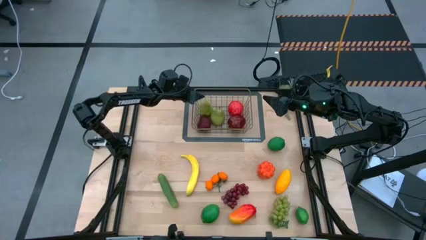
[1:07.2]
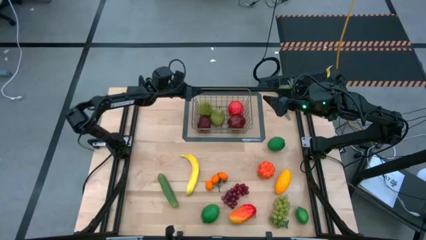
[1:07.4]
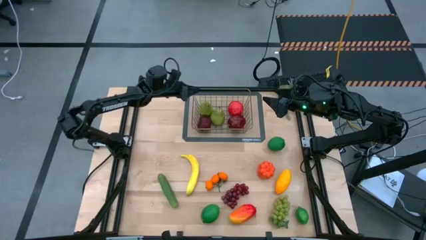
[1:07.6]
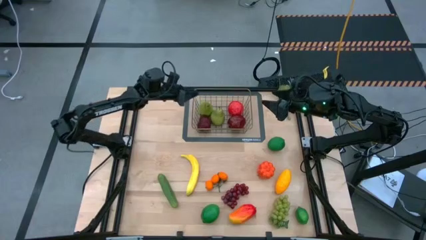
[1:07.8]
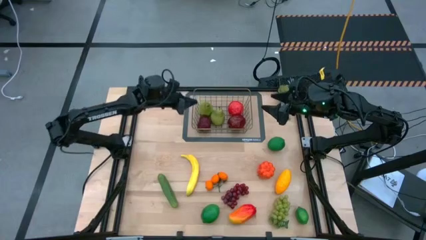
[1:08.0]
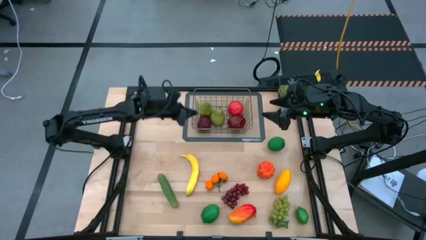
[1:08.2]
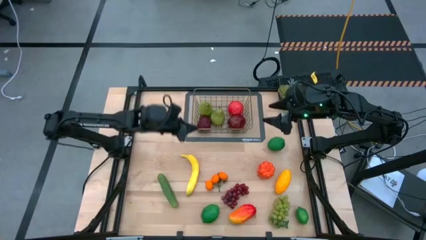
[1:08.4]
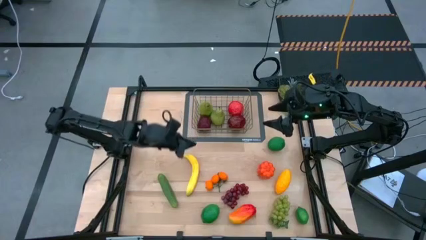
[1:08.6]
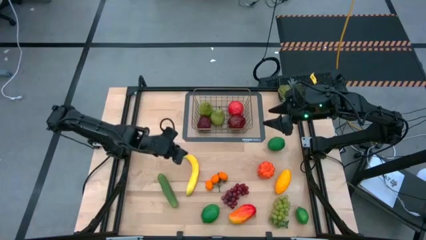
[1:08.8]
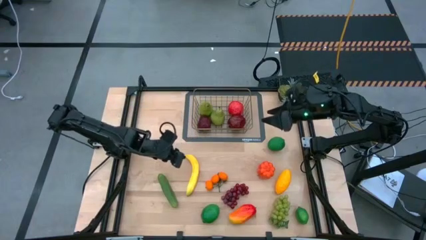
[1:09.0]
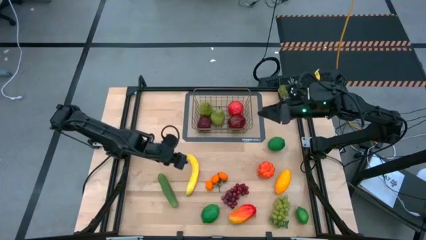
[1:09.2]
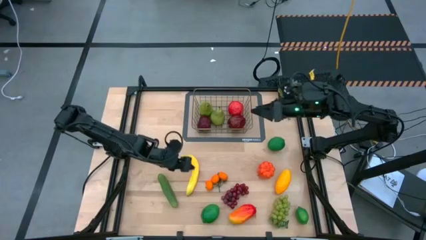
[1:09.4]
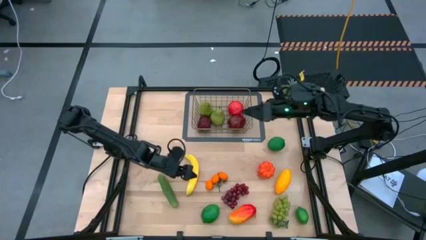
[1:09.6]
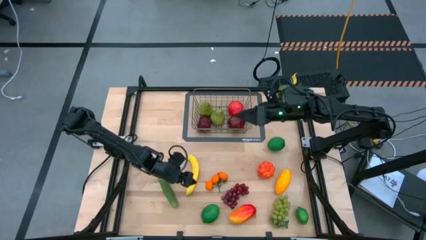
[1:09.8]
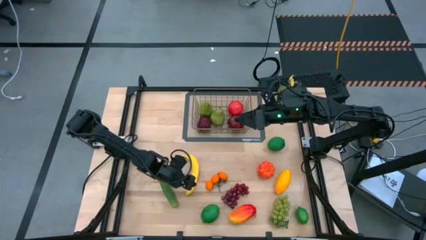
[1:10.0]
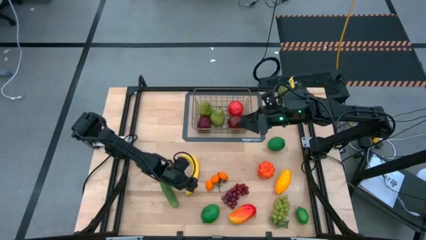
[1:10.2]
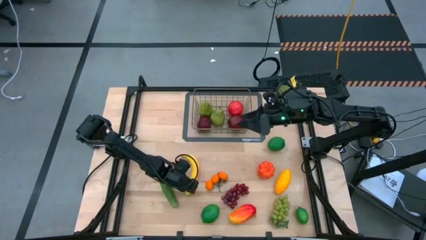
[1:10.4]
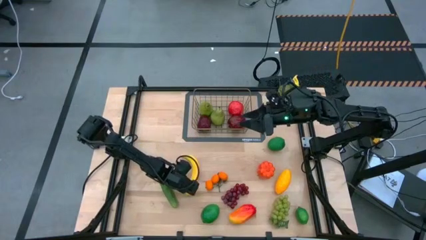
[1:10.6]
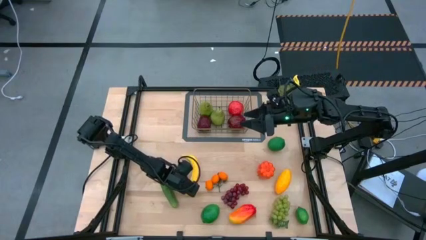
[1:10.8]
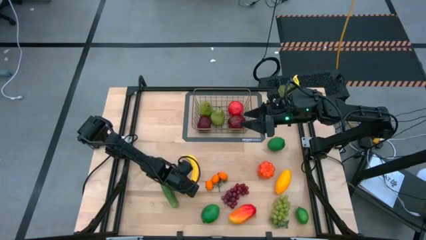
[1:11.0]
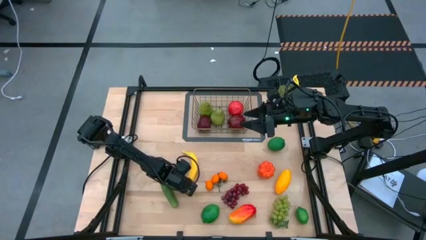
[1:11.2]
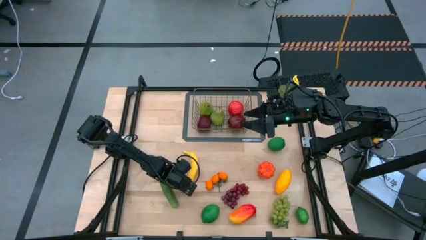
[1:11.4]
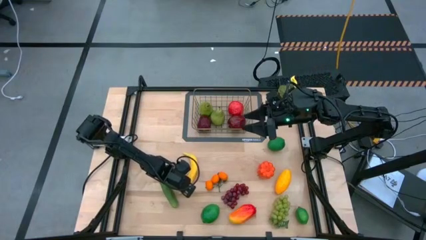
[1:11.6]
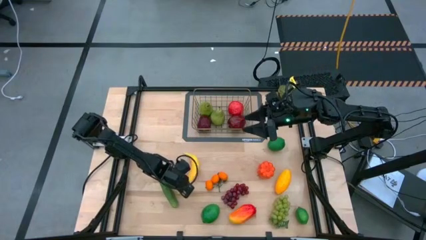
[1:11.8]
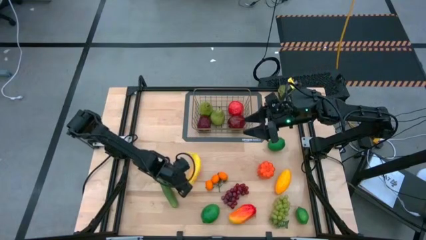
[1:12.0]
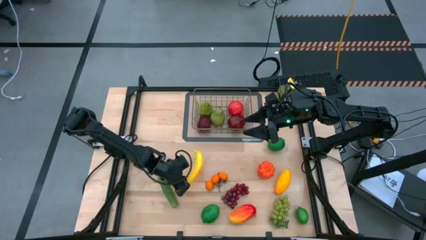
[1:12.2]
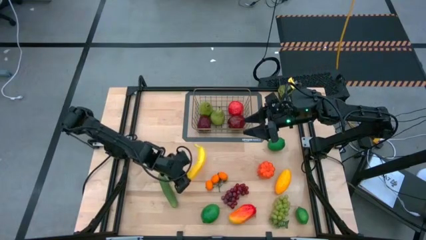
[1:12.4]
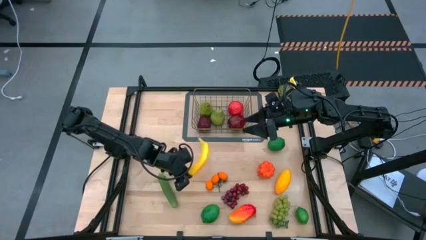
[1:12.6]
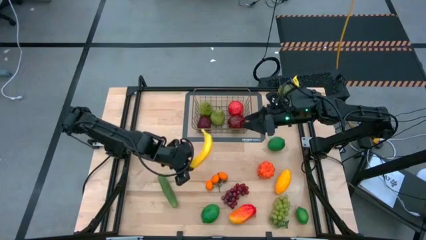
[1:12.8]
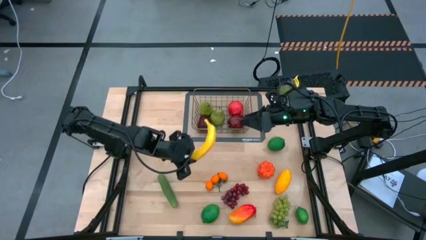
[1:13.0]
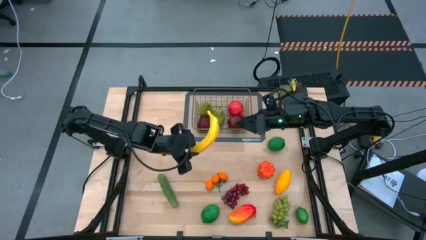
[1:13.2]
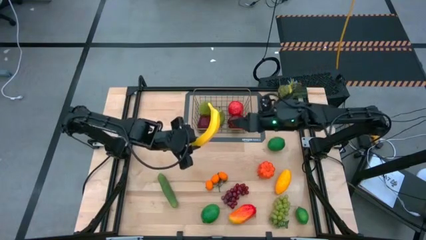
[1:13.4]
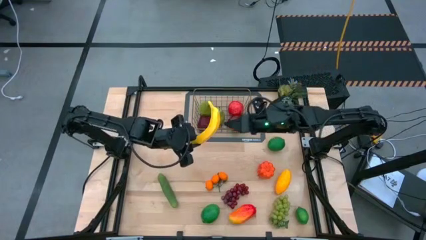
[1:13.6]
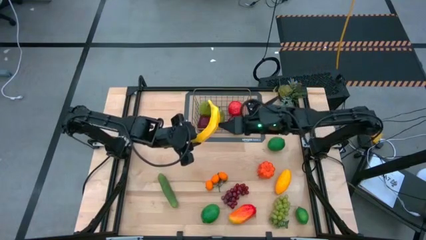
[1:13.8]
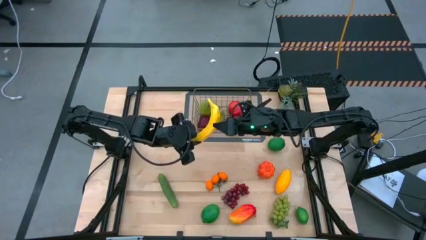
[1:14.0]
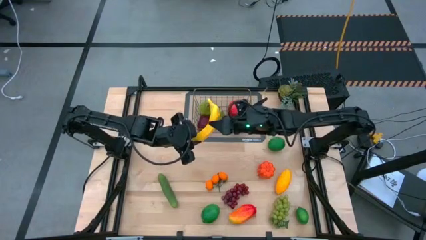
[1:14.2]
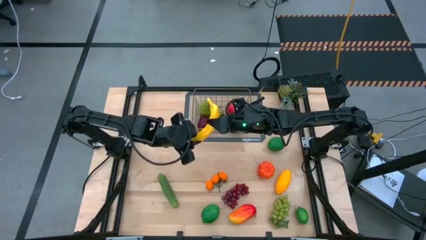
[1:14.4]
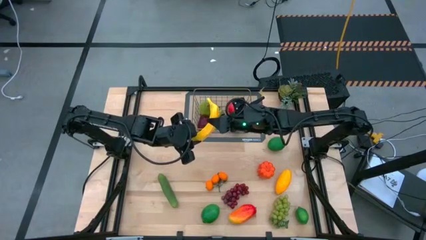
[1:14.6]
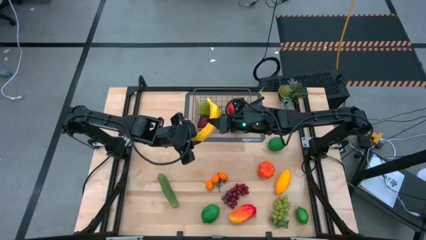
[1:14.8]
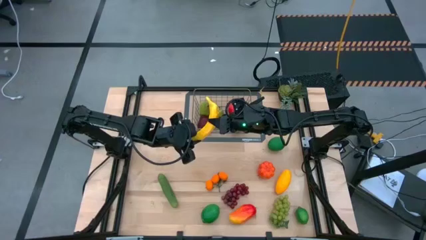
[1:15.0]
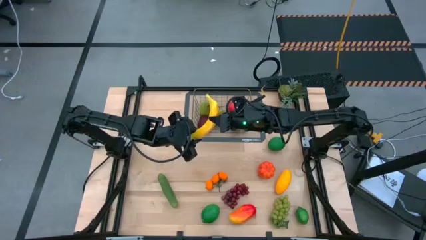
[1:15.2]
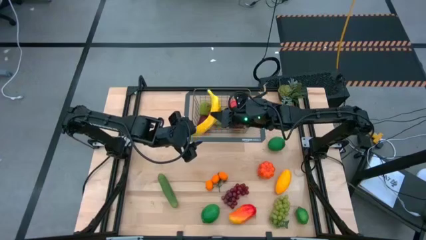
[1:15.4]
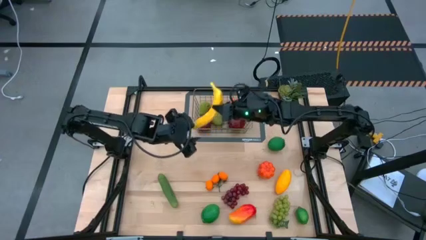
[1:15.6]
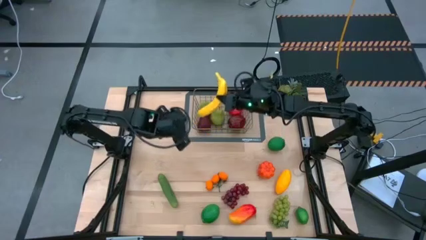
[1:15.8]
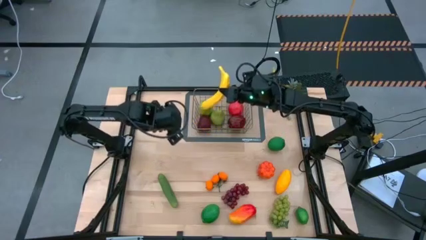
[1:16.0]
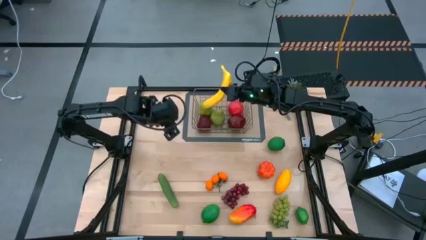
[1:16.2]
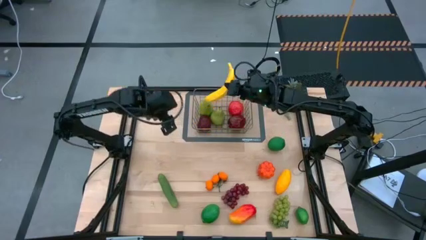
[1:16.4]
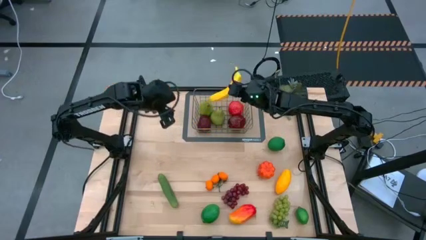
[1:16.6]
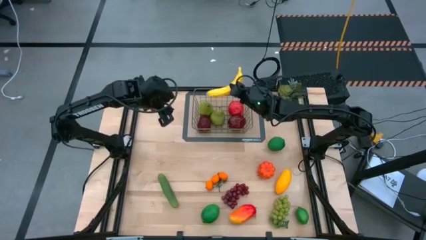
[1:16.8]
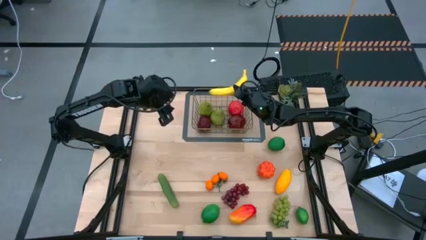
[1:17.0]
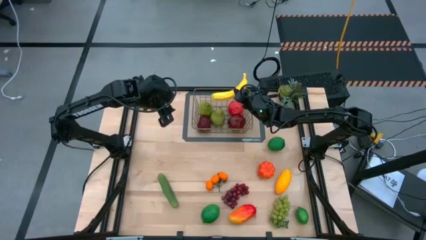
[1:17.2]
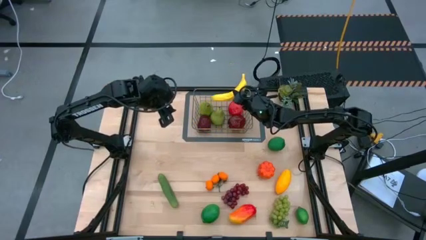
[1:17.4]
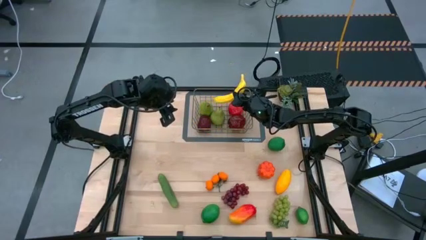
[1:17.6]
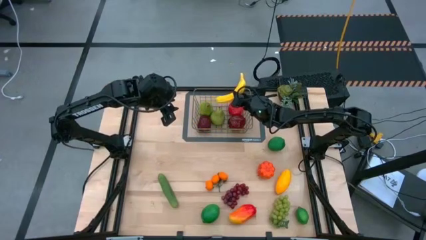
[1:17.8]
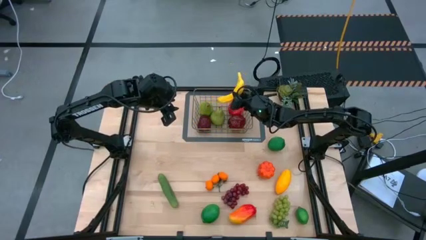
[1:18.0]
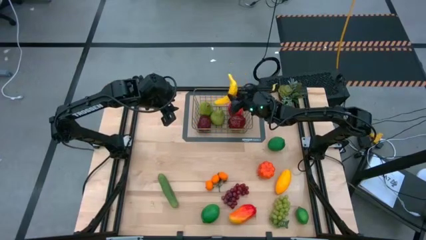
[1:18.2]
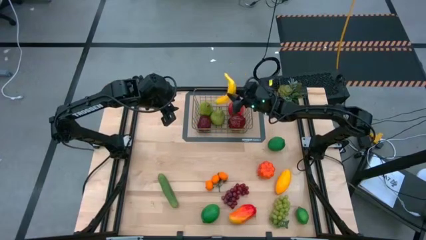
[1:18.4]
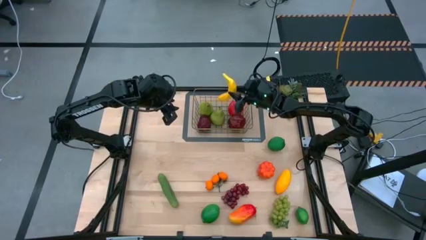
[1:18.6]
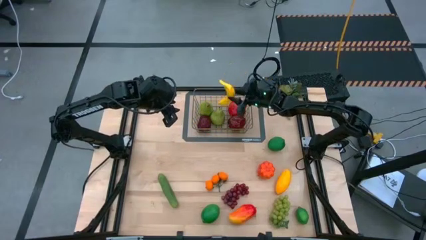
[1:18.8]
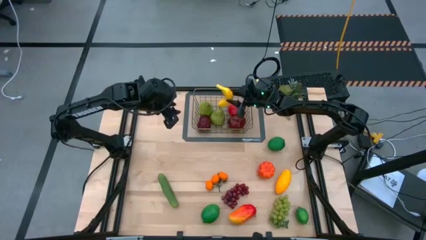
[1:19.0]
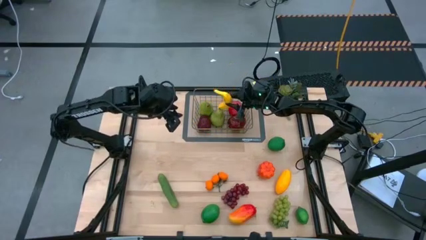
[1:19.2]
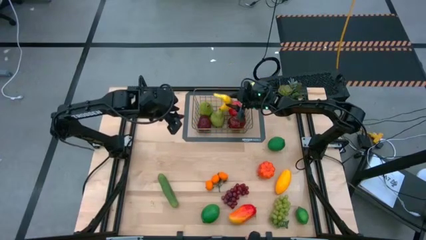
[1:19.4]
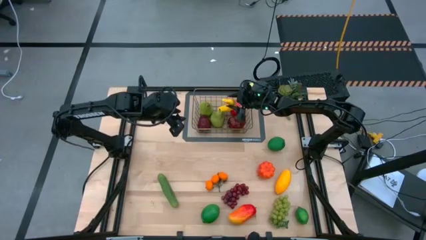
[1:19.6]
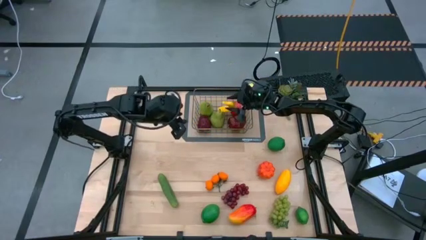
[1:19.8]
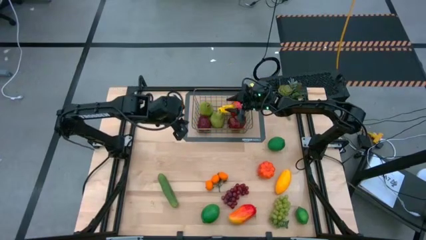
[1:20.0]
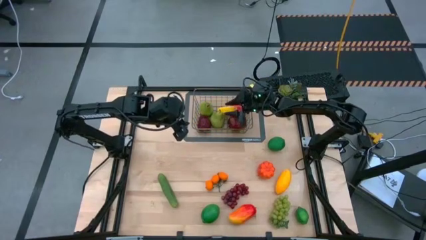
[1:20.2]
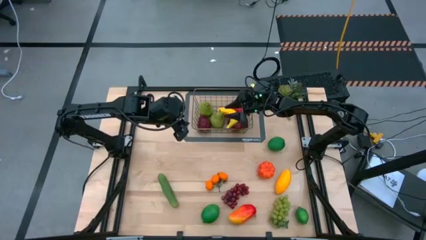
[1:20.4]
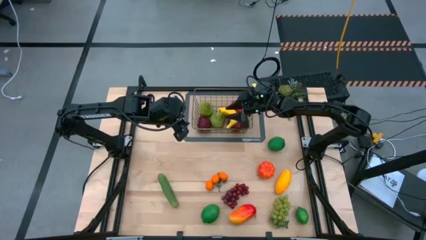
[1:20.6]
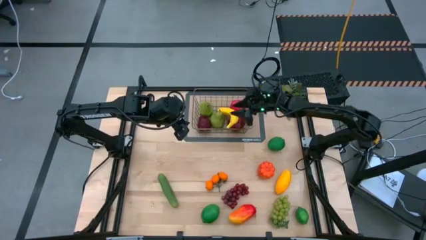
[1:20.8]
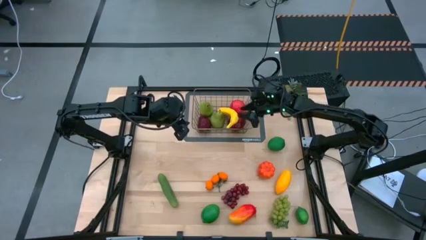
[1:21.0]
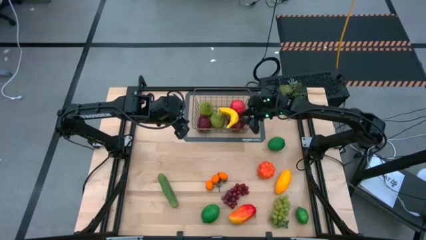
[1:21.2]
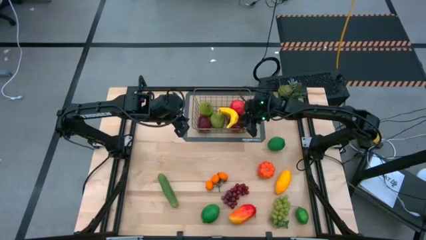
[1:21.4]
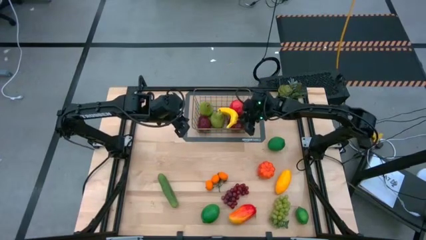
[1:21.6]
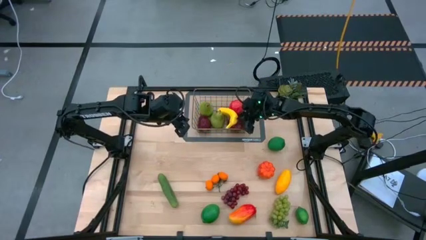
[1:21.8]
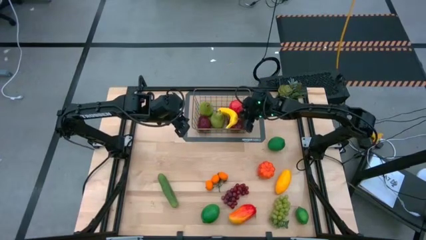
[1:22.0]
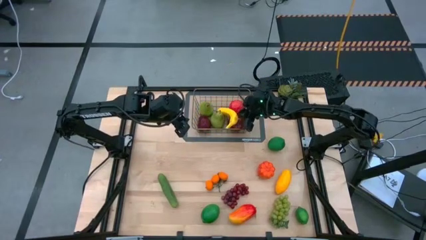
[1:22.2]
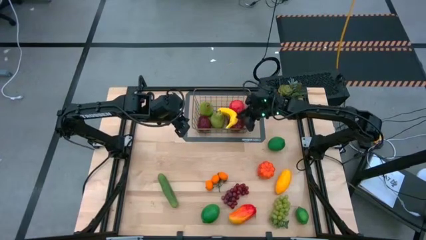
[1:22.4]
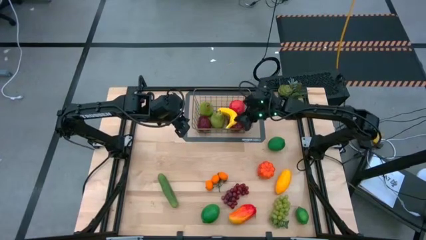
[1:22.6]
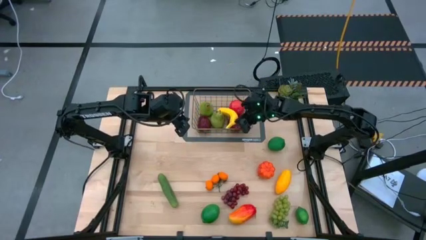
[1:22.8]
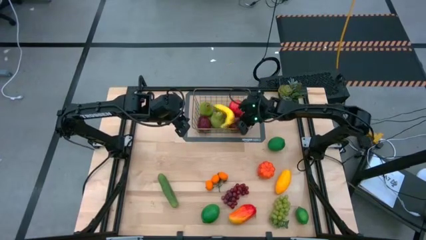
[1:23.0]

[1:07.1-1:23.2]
Task: Build produce basket
Put the yellow banana into the brown wire basket

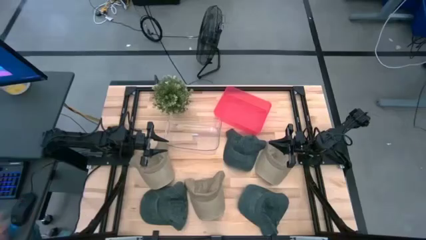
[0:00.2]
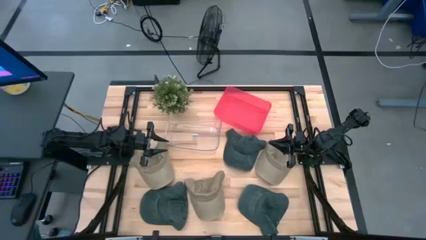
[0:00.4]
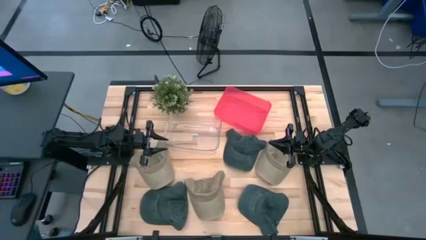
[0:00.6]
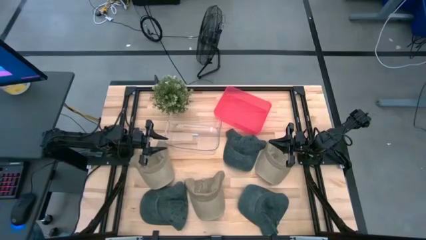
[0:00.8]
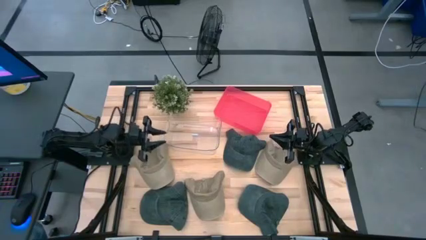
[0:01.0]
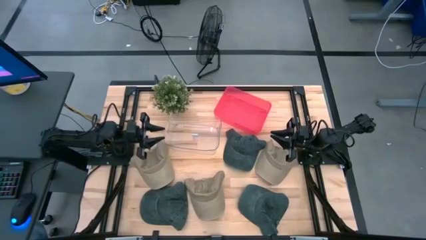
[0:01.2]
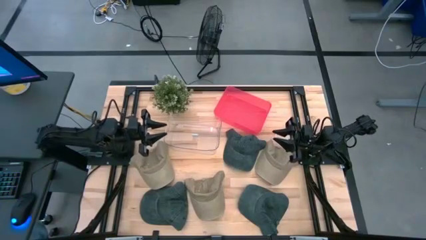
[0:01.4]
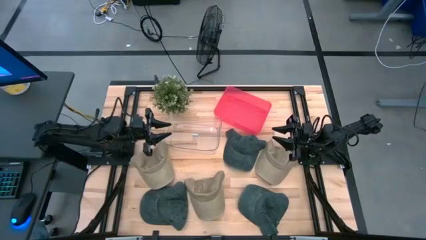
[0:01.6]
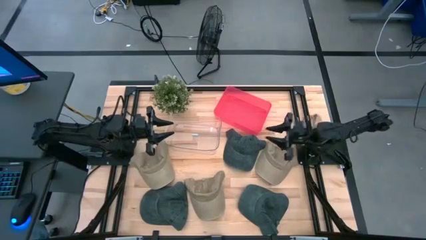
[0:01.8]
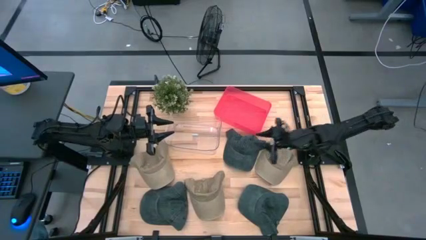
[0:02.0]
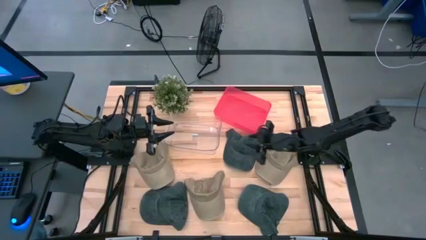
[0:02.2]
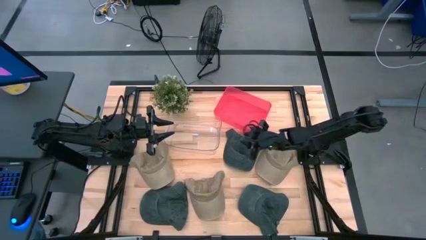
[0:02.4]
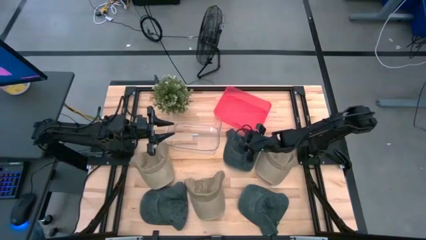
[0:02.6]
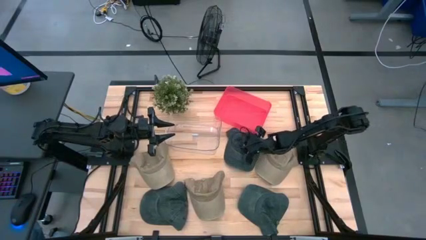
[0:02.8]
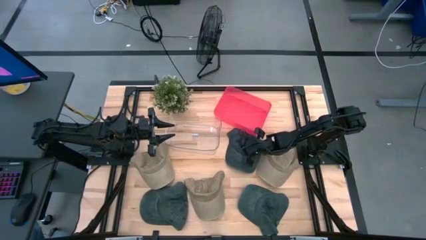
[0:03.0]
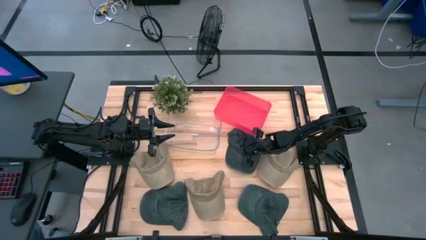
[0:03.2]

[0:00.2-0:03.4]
Task: Pick & Place hat
Put the top black cap into the red bin
